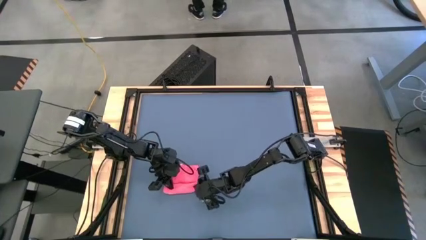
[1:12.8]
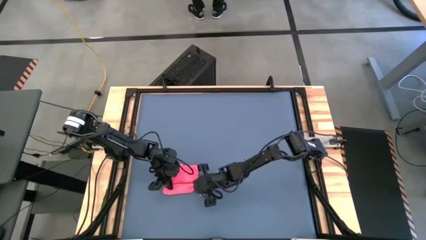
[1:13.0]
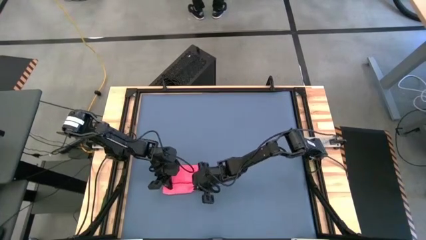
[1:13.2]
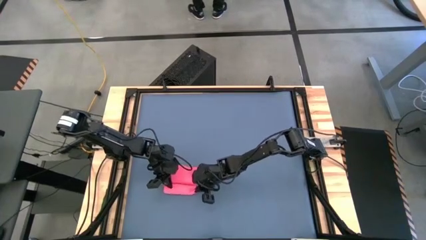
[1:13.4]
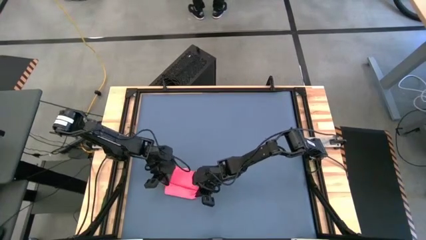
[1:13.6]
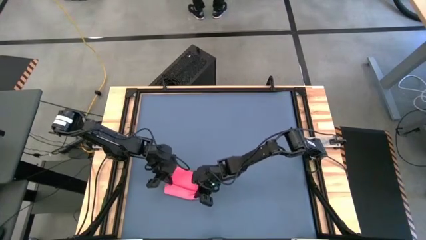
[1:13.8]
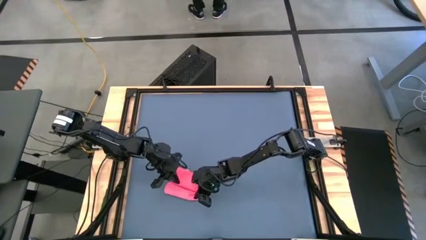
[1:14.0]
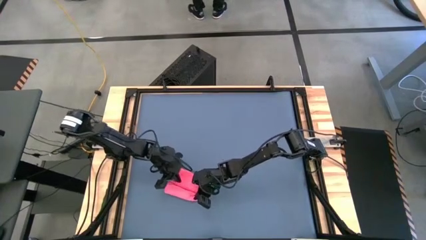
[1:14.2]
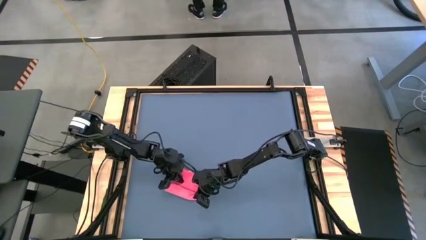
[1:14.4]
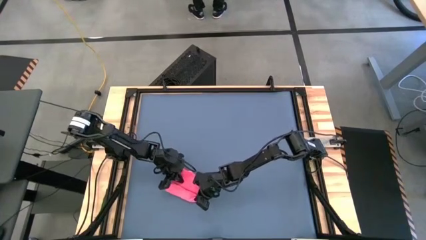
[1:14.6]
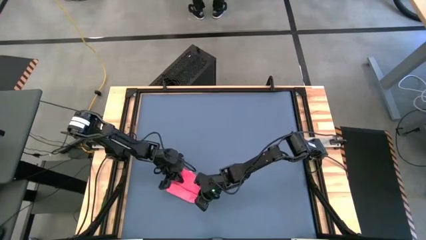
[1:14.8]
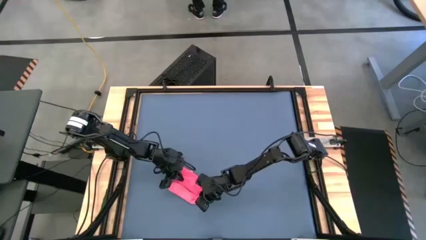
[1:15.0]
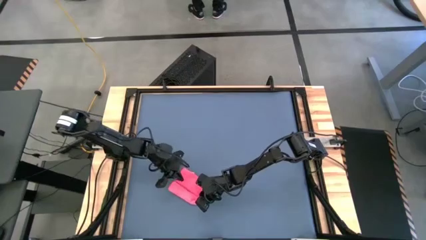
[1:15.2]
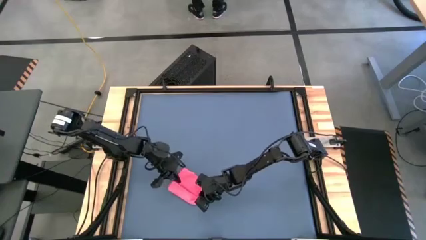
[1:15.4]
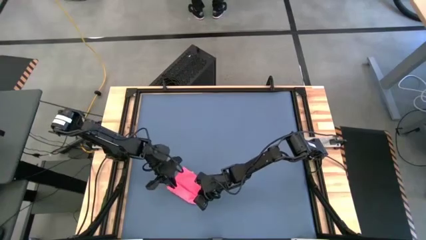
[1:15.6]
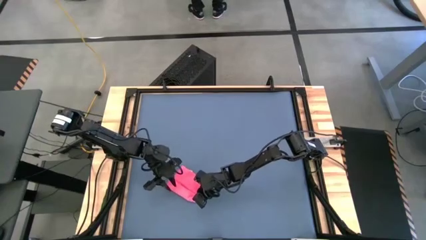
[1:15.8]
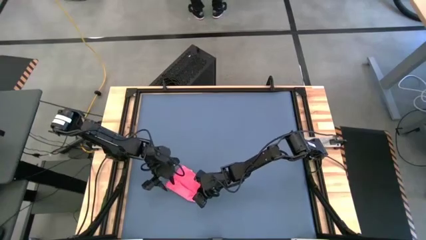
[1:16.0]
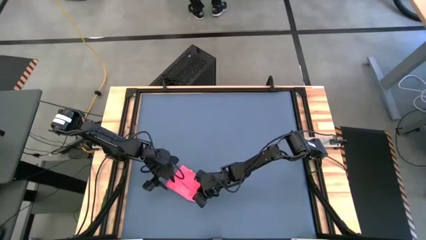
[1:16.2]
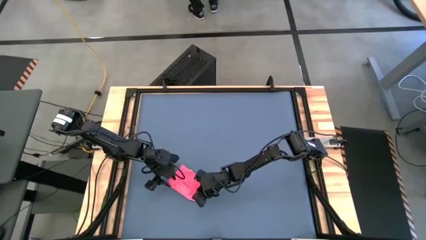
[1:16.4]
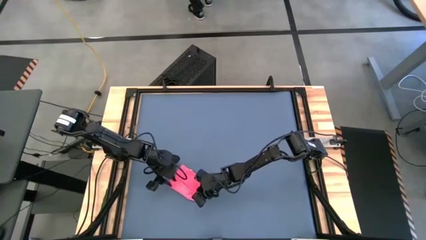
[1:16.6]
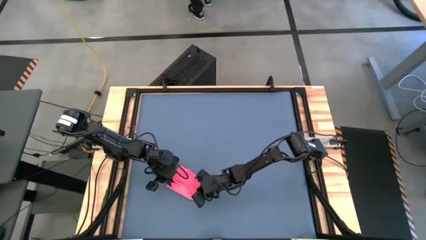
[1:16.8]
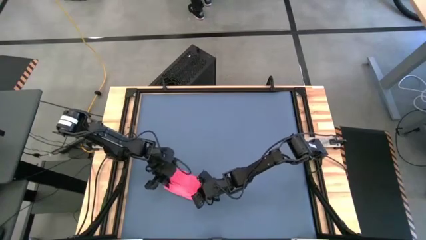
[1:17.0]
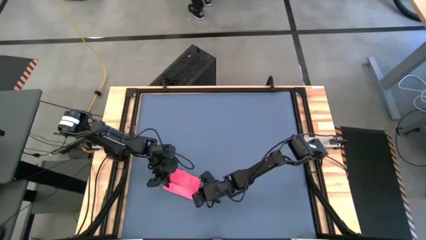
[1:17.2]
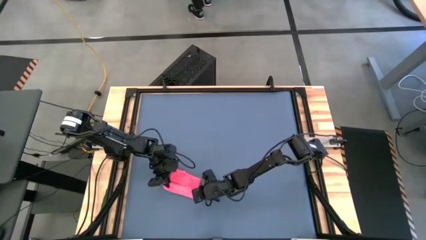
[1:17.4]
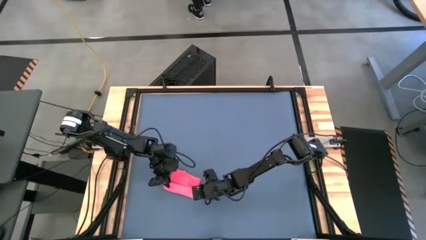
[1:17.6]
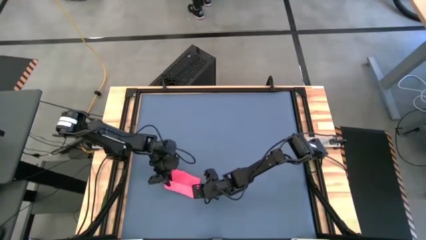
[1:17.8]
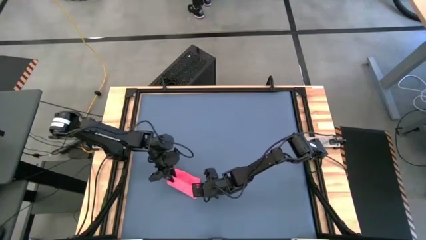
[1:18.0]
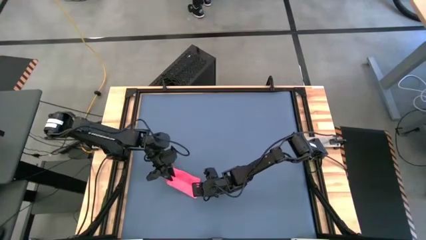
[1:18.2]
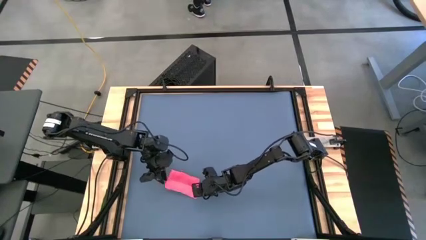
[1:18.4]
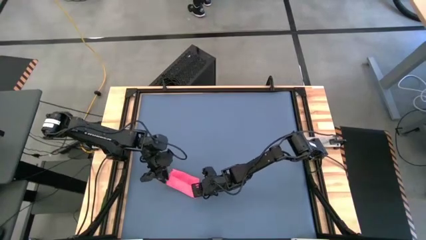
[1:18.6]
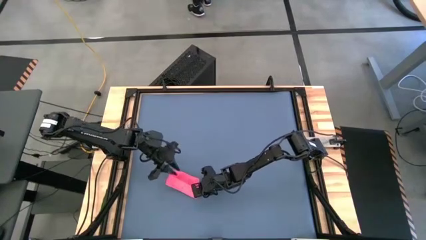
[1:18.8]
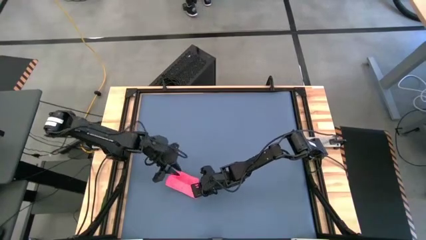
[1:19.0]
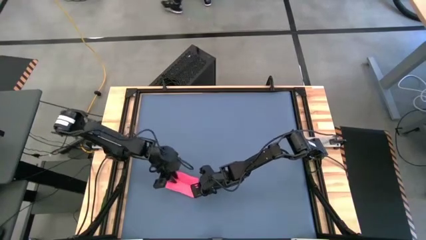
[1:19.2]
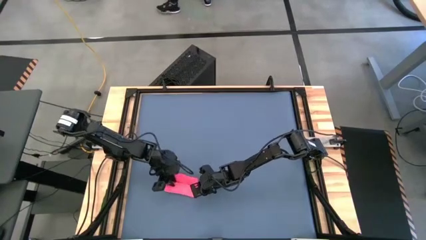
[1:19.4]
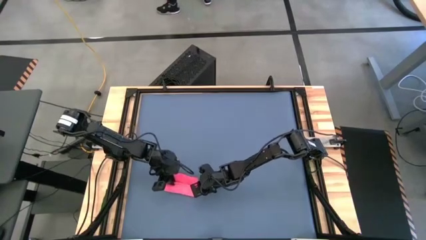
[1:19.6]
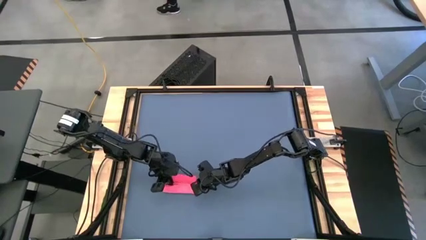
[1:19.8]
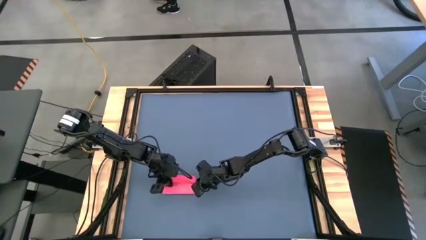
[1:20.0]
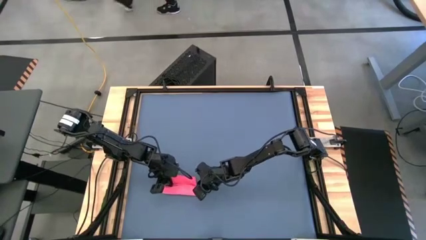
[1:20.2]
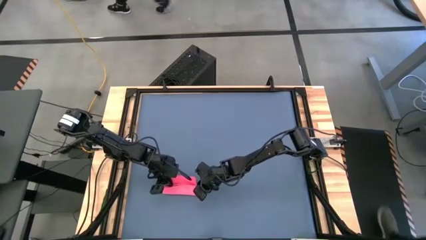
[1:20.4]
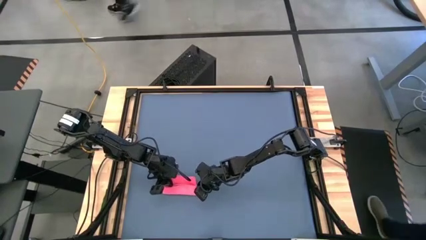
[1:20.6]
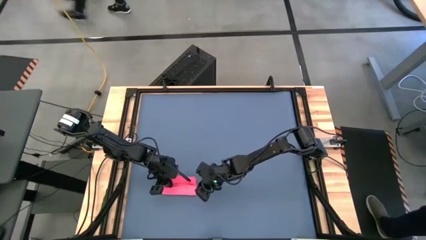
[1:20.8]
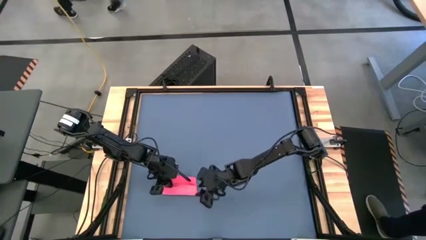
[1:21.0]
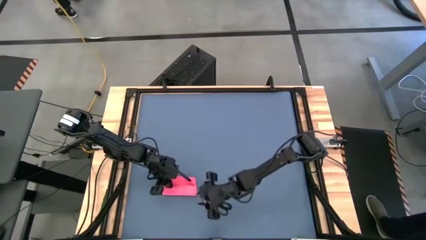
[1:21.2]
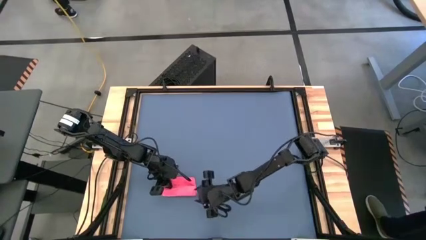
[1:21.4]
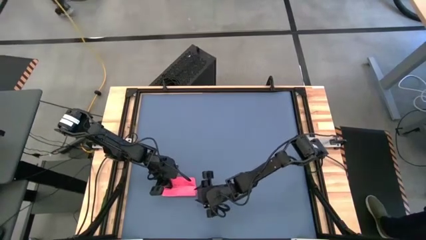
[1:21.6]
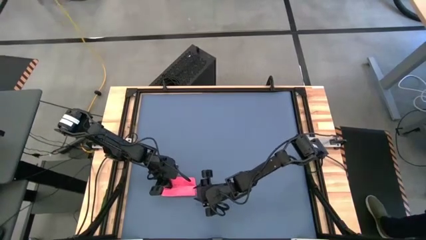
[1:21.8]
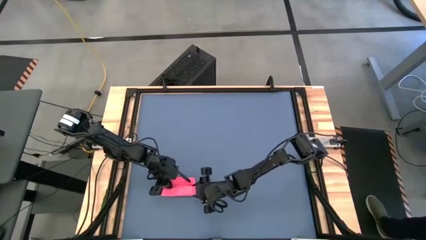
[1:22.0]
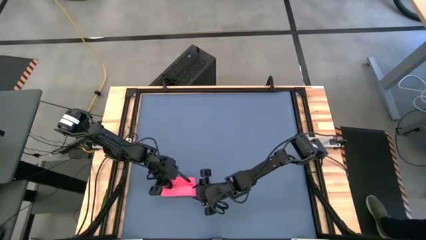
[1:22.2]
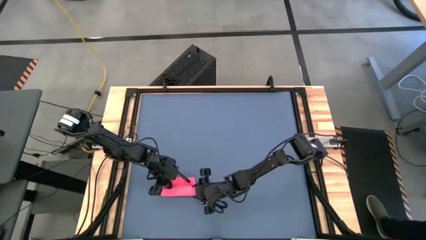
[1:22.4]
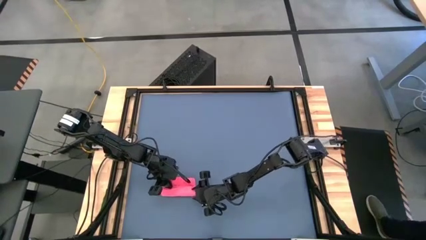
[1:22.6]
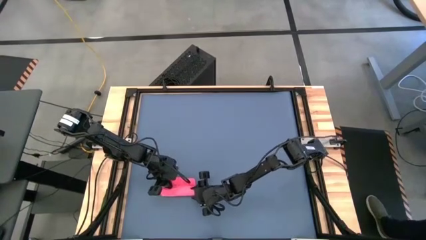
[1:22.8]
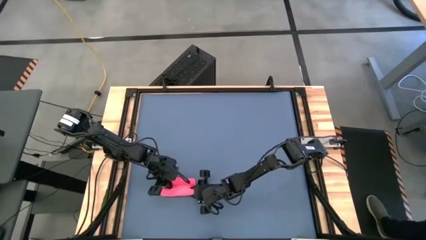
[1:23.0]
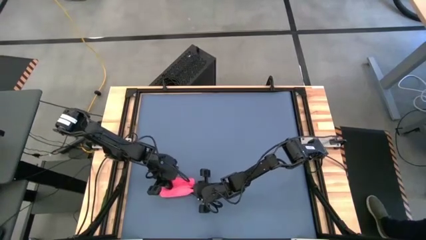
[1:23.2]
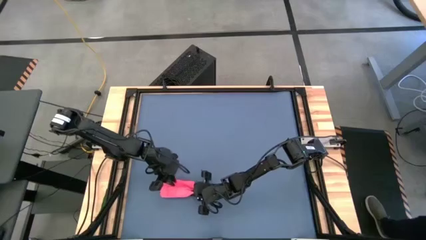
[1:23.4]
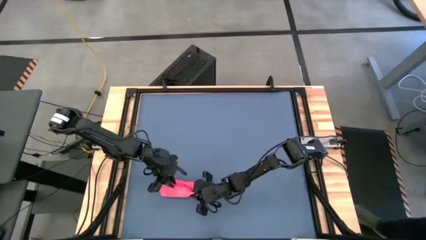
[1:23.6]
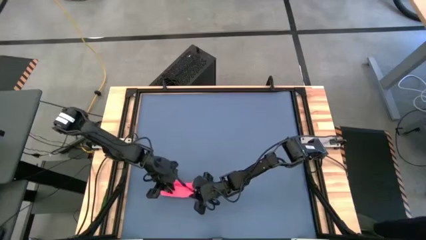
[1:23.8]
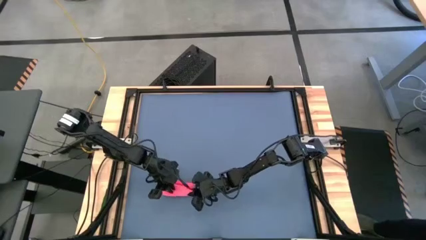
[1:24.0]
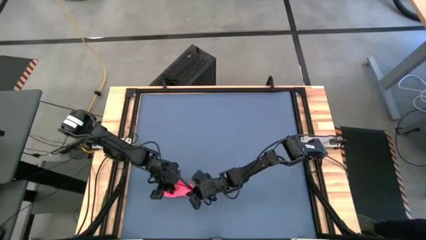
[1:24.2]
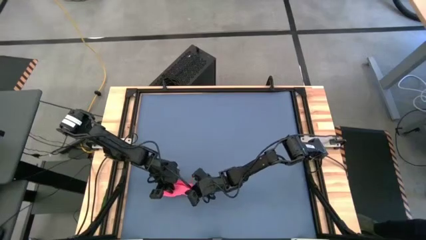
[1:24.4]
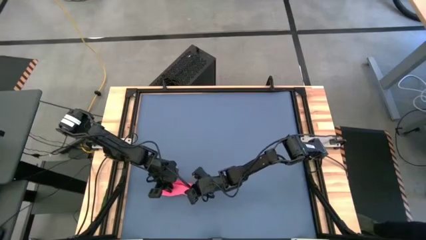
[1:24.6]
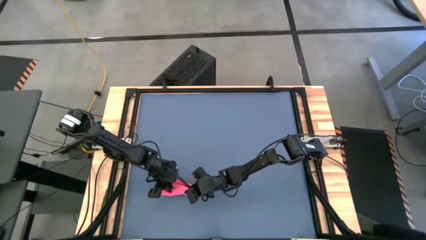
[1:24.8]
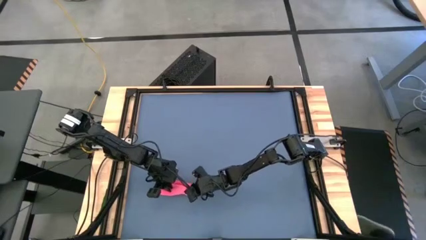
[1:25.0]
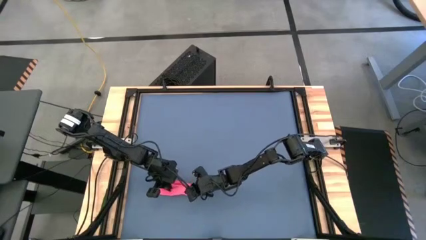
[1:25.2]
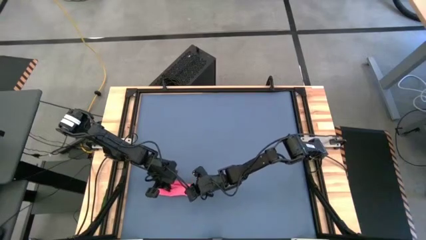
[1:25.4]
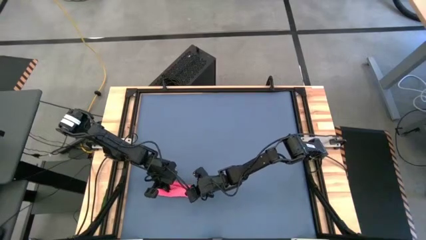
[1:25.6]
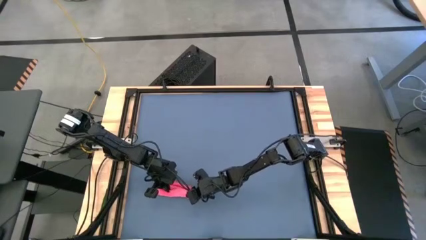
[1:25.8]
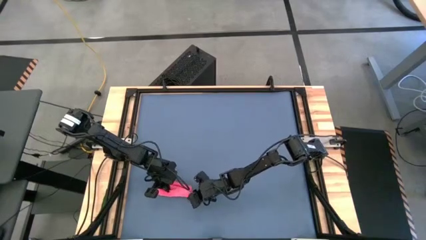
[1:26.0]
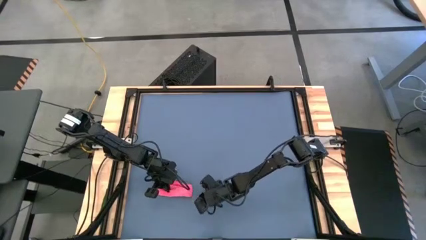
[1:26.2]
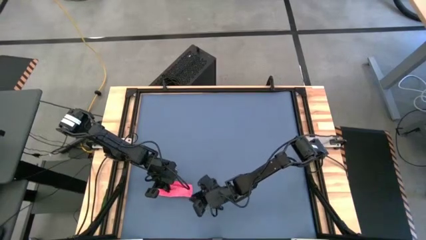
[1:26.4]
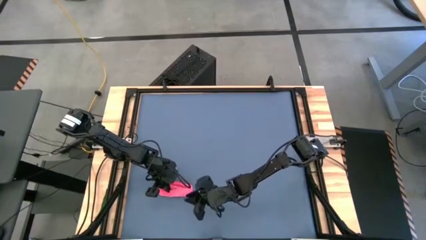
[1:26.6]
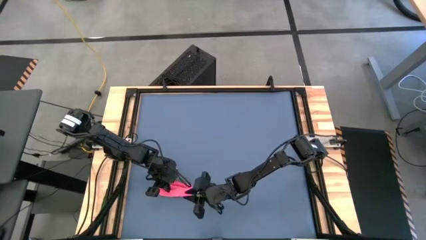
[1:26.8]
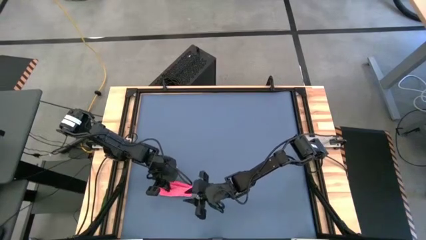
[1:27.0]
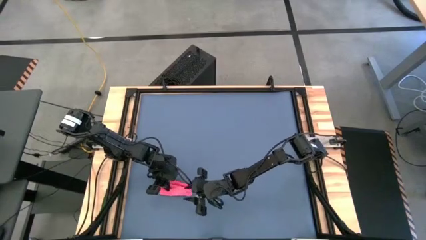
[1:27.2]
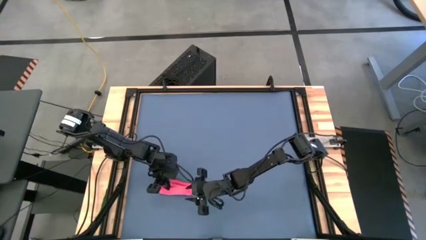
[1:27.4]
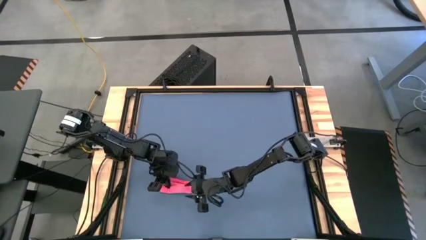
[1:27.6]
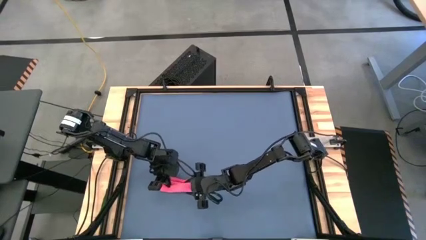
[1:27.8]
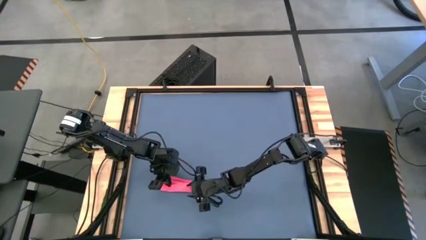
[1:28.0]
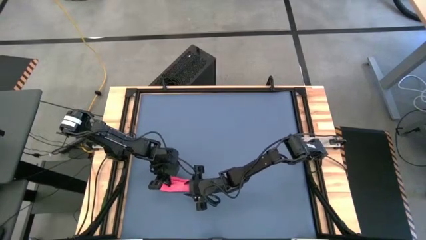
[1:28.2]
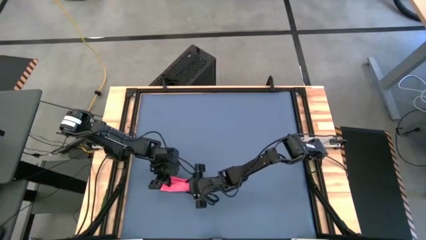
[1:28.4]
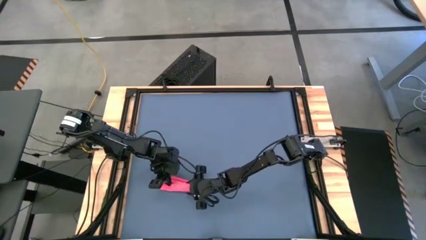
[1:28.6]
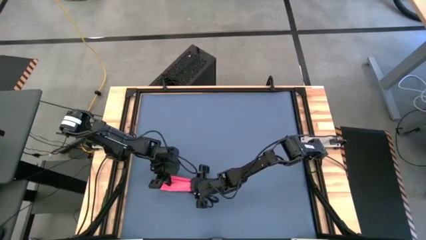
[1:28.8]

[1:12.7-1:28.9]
Task: Roll towel
Roll the red microfiber cloth
